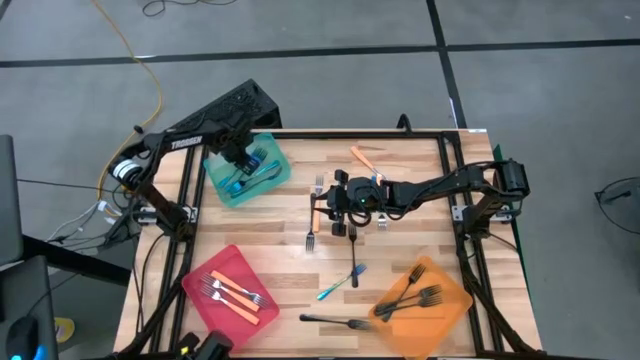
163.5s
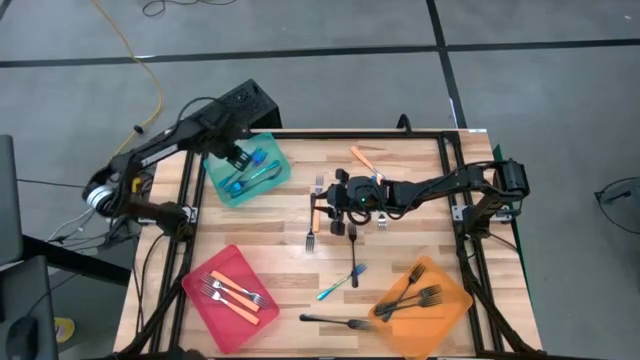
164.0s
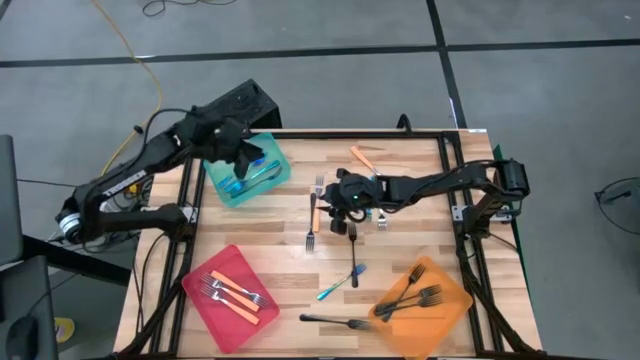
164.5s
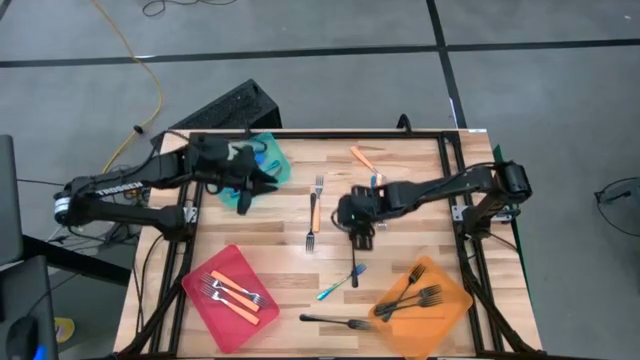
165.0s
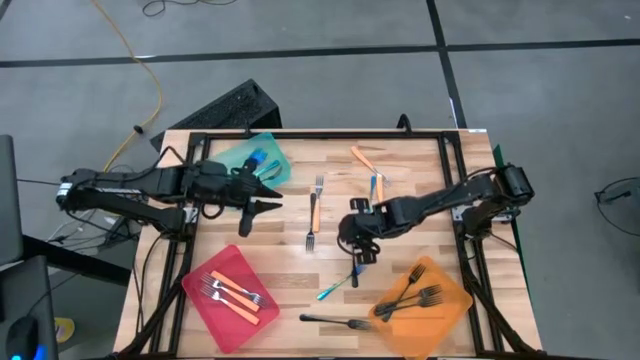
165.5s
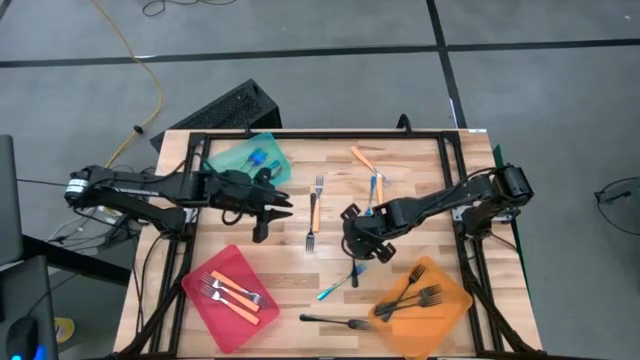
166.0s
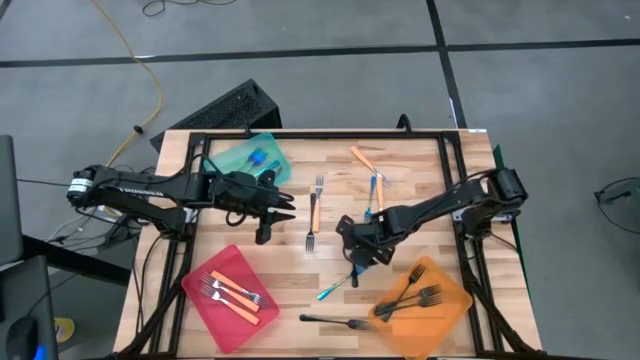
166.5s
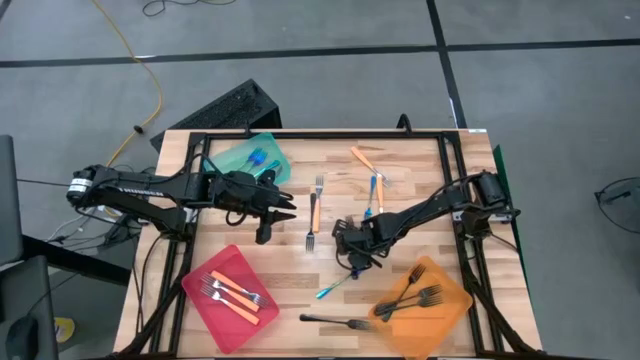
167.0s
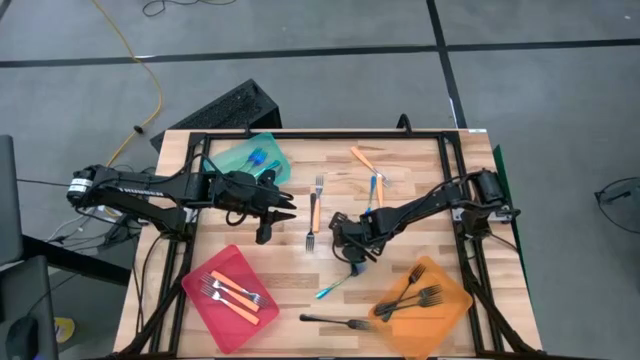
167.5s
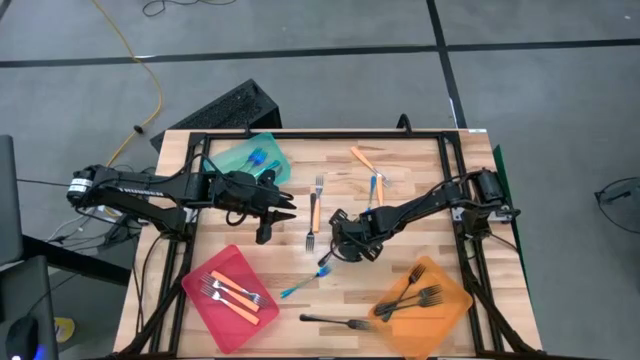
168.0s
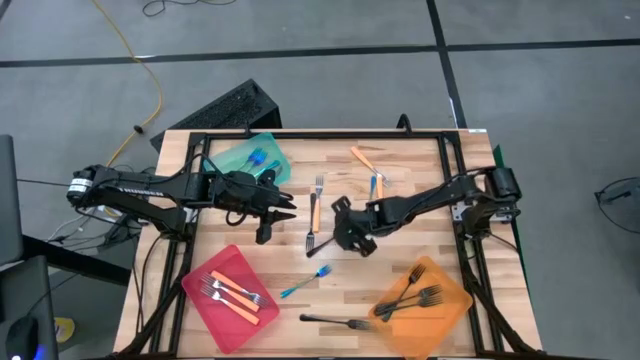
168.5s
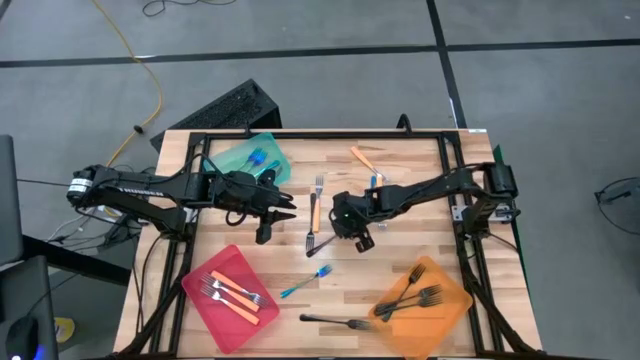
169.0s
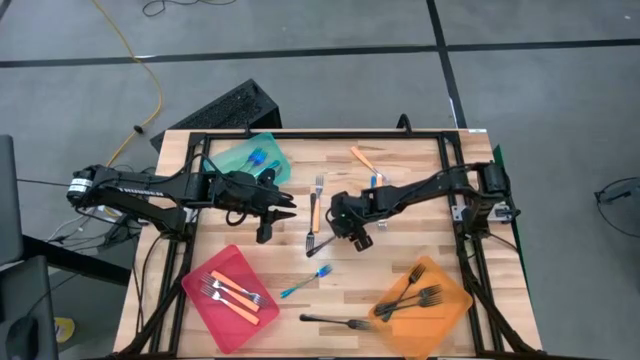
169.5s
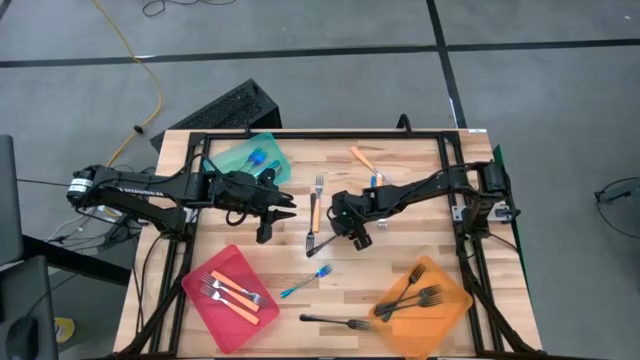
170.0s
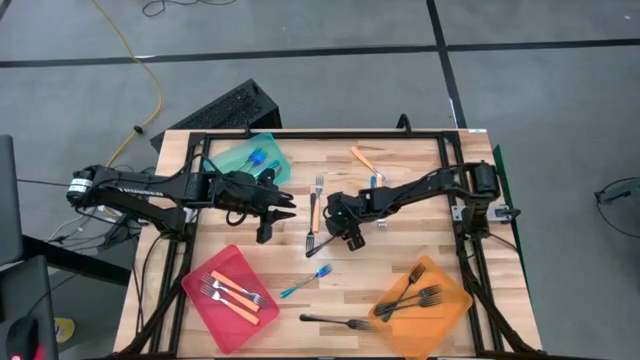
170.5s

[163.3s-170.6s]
Task: Sort silverware by color (type)
Put the black fork into the orange bin

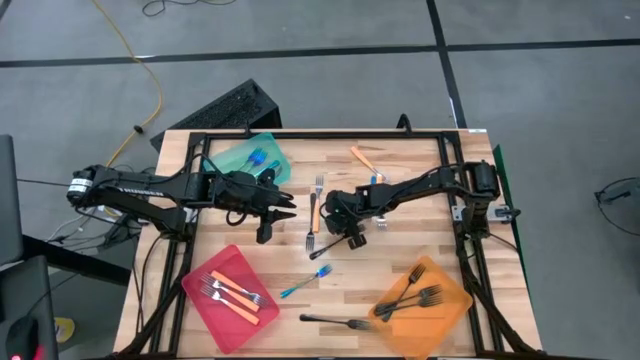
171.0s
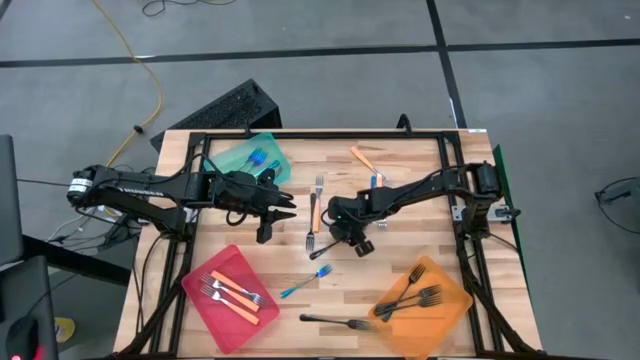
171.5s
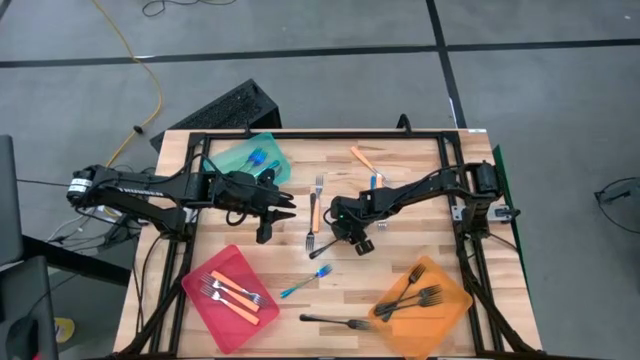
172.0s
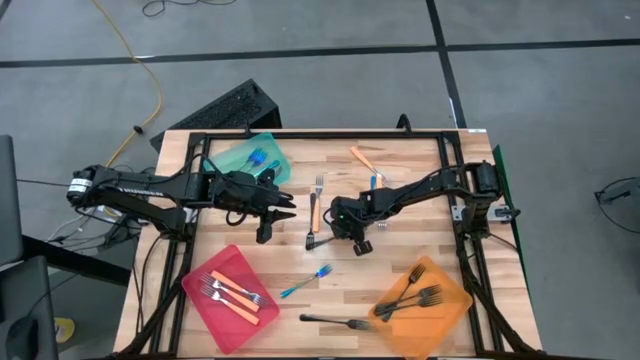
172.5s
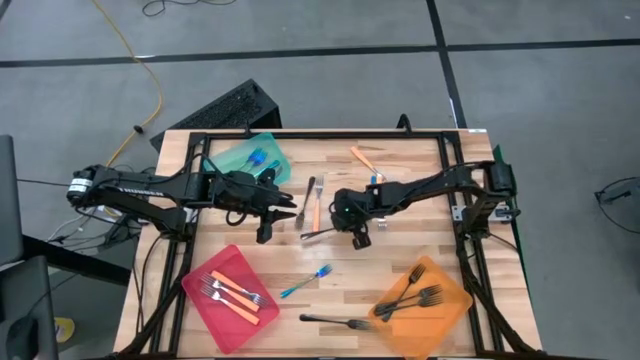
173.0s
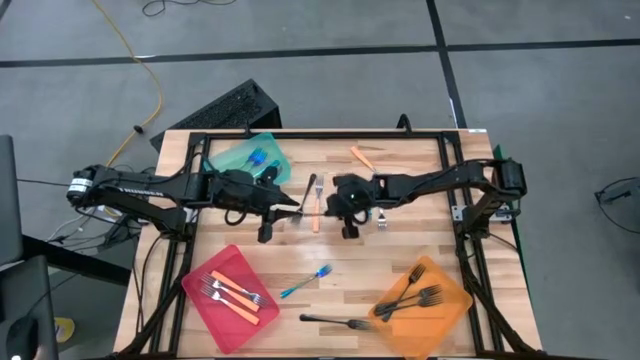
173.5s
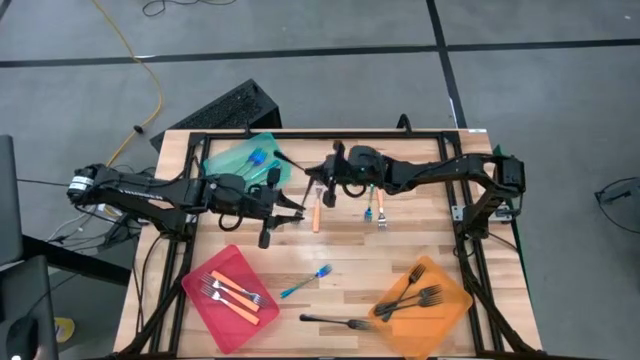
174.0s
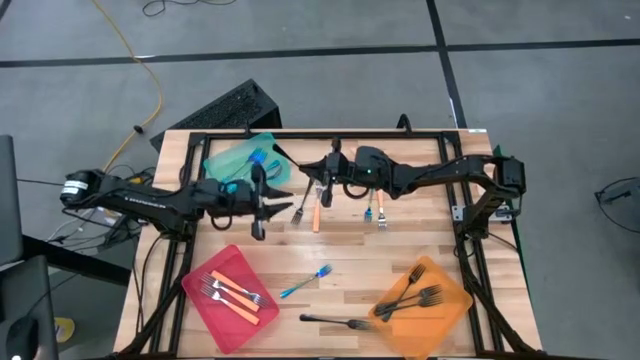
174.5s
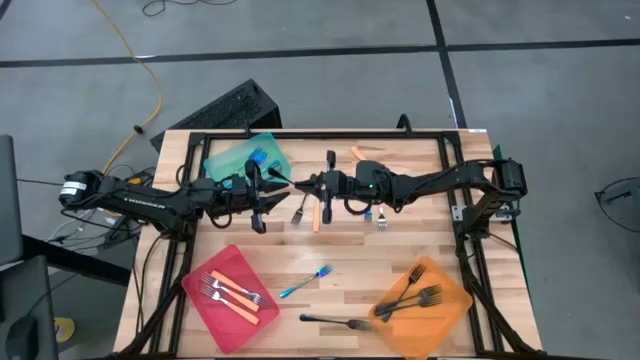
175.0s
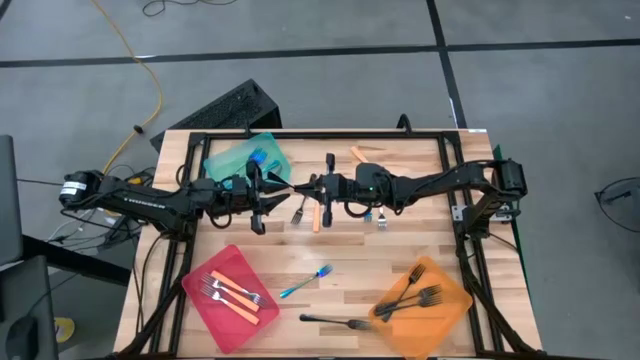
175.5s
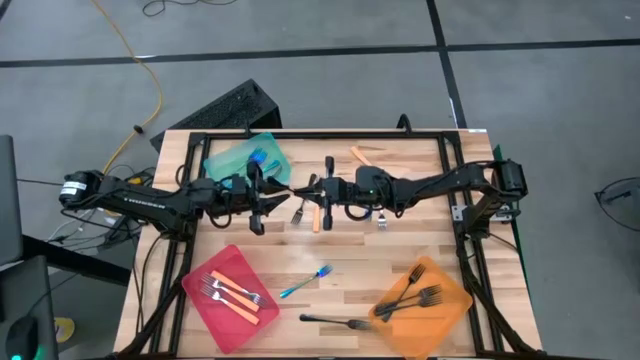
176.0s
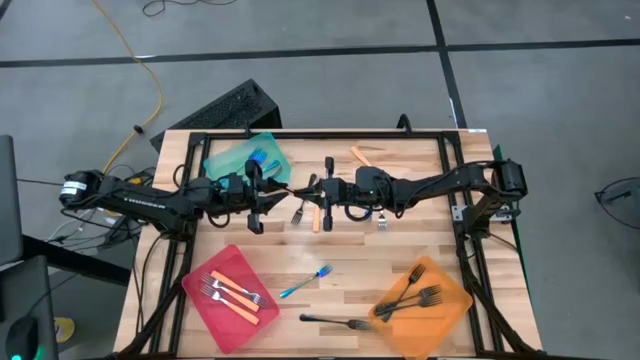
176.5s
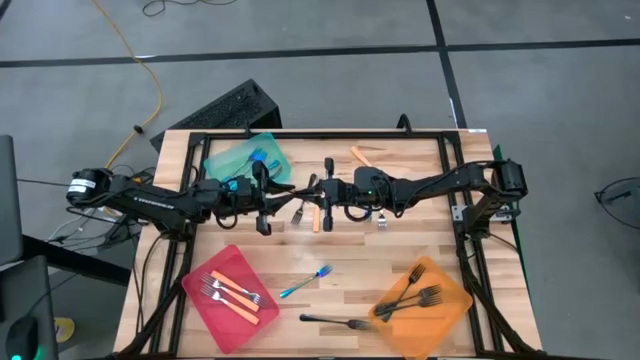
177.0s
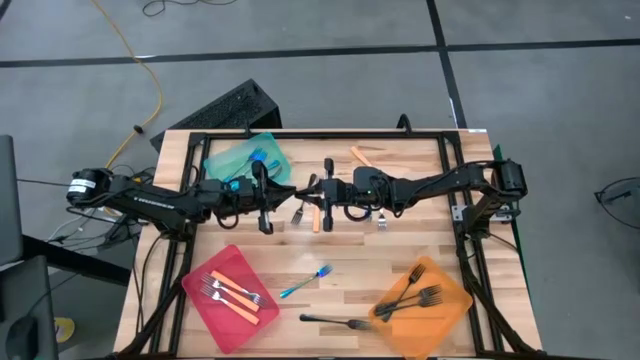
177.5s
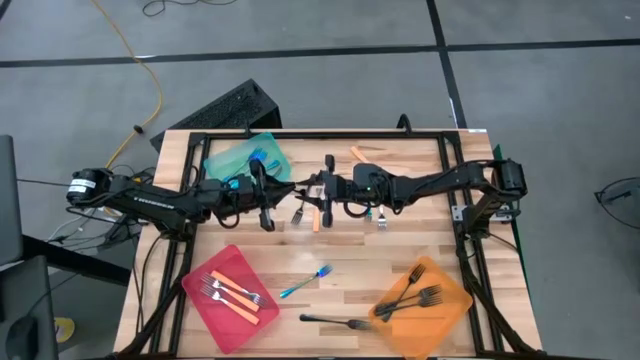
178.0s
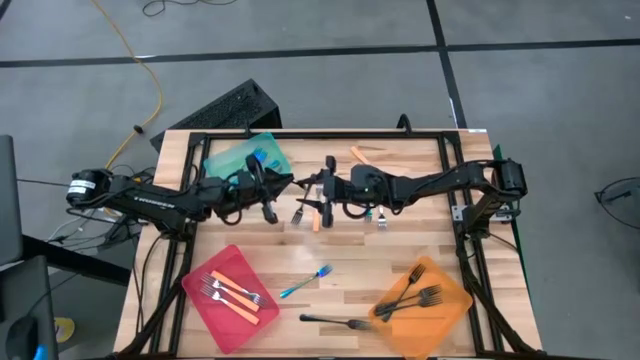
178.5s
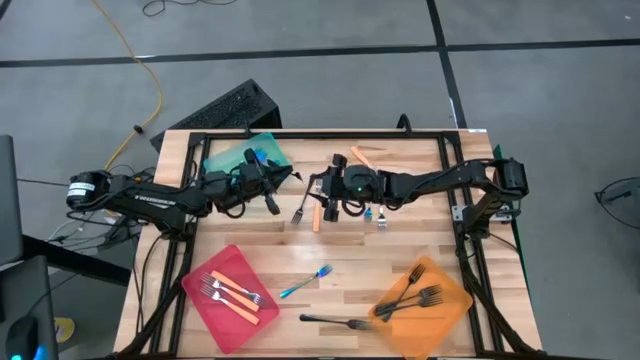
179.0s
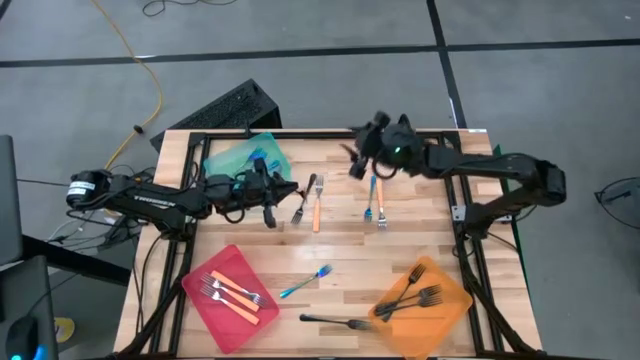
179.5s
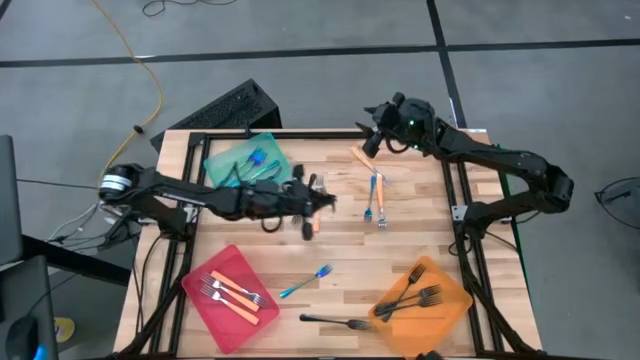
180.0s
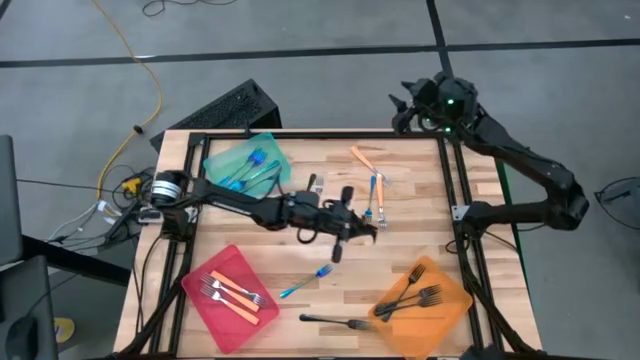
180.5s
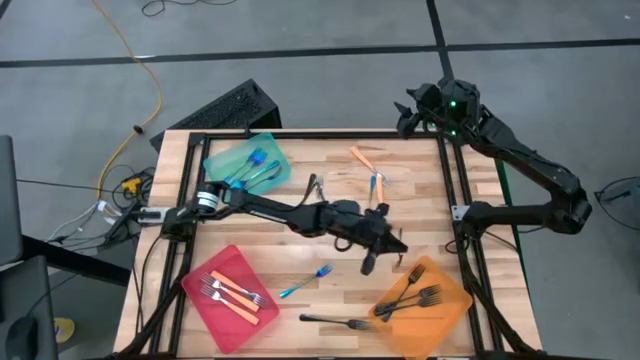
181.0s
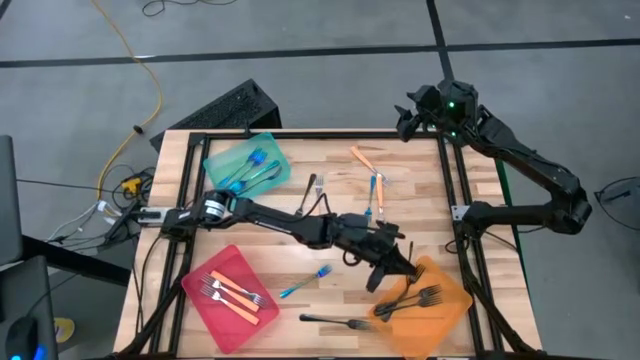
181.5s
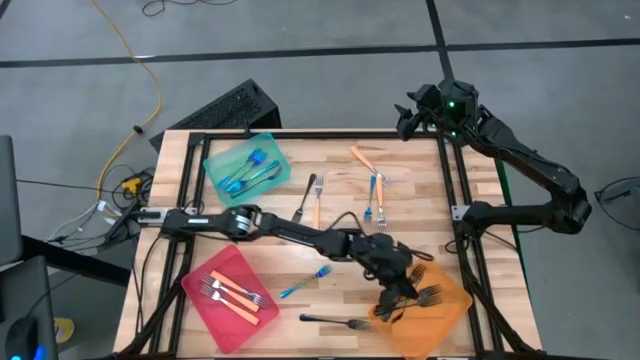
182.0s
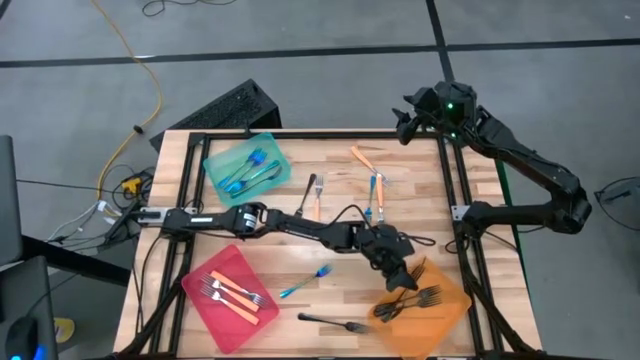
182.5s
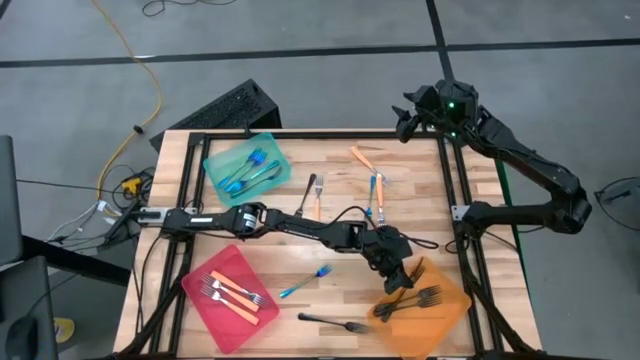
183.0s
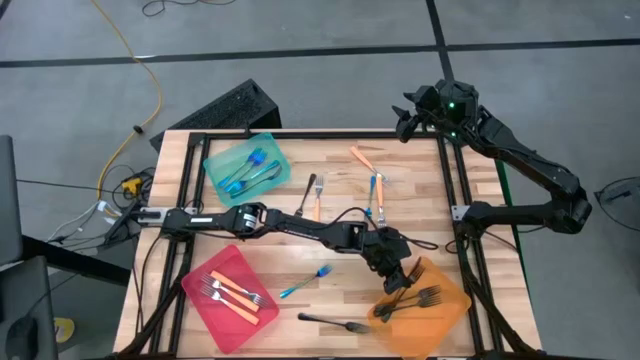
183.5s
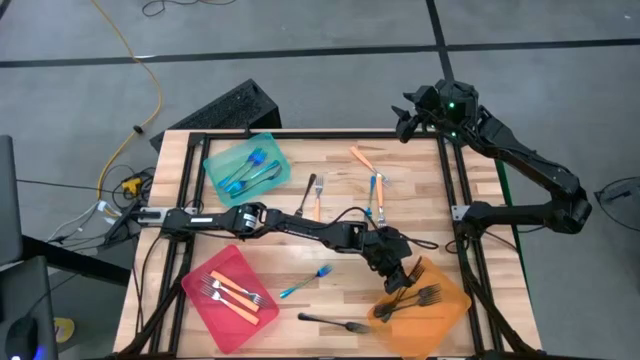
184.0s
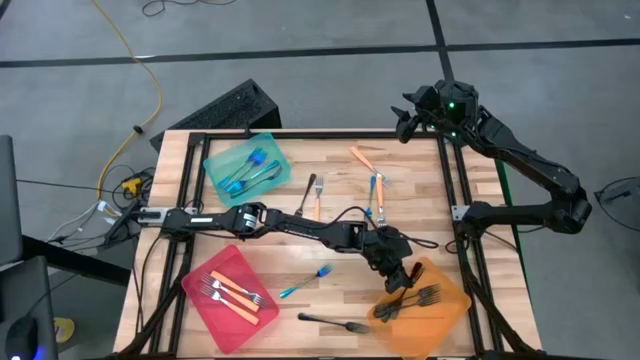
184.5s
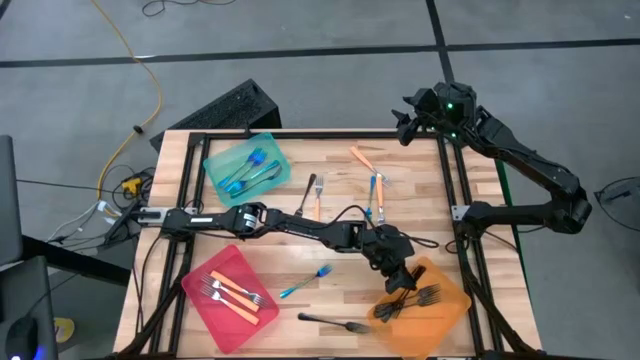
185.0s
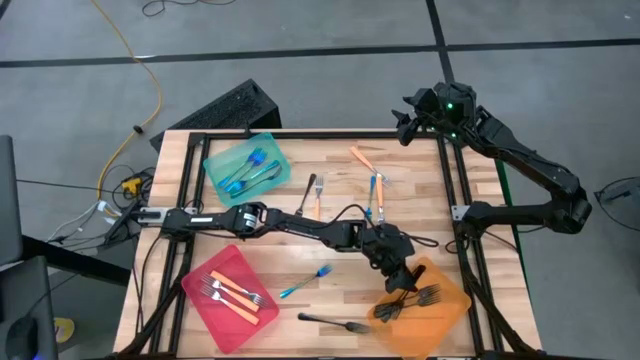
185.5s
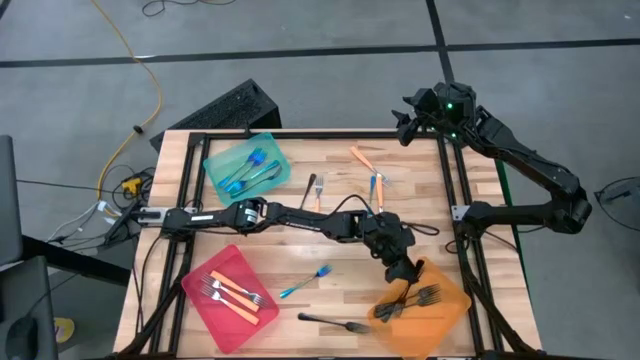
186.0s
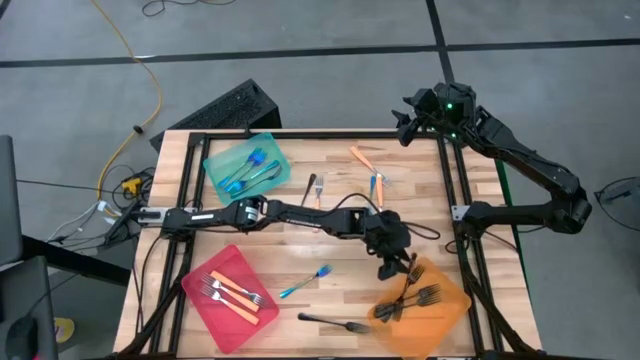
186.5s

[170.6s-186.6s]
Put the black fork into the orange bin
